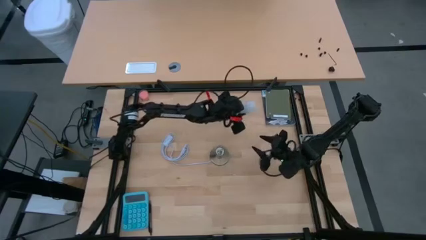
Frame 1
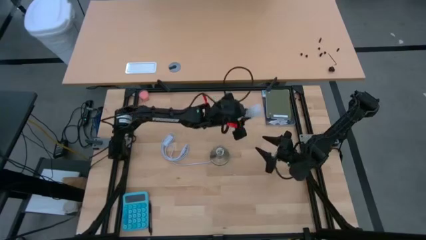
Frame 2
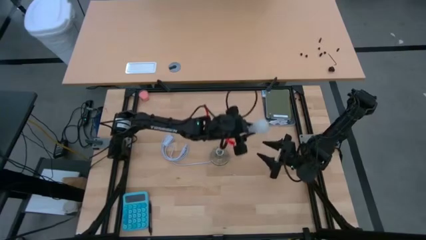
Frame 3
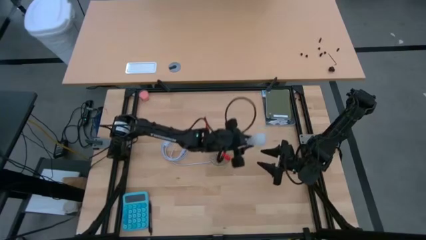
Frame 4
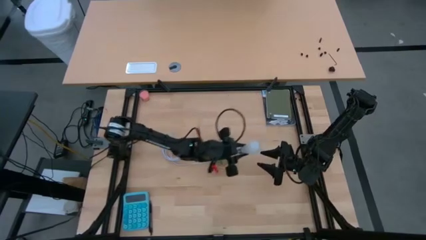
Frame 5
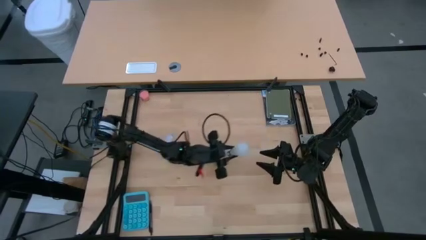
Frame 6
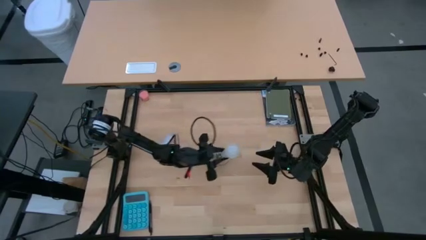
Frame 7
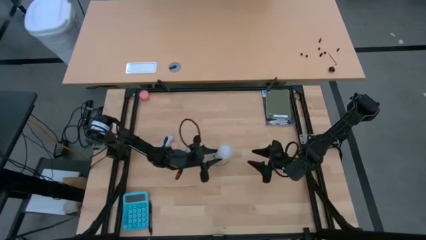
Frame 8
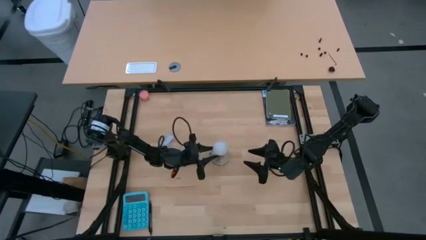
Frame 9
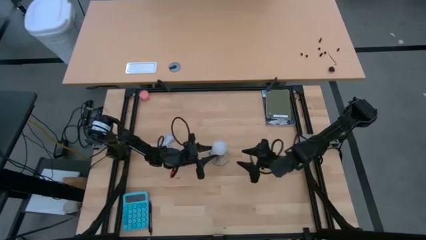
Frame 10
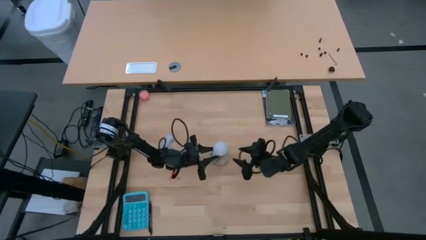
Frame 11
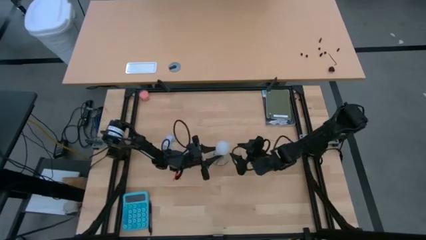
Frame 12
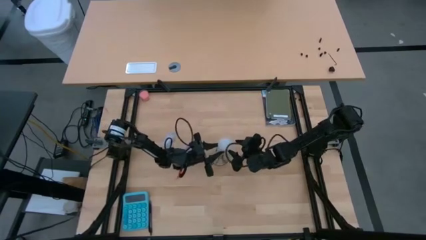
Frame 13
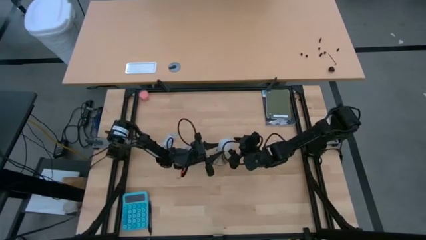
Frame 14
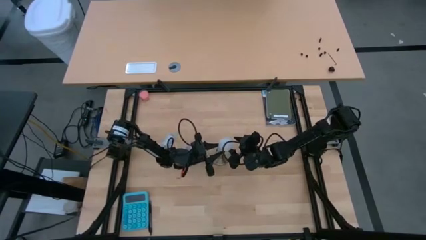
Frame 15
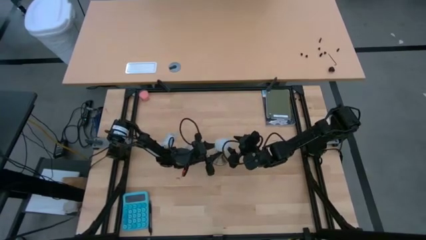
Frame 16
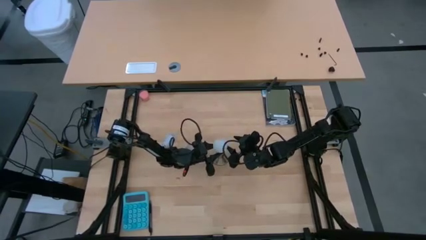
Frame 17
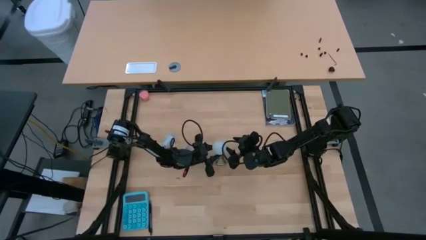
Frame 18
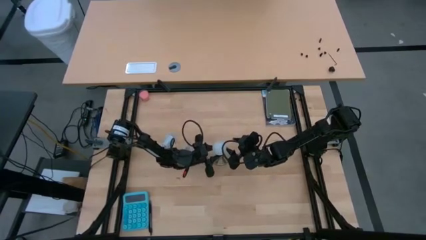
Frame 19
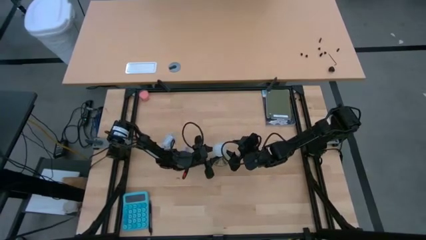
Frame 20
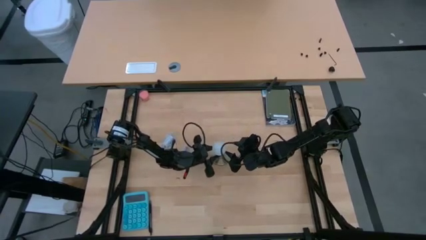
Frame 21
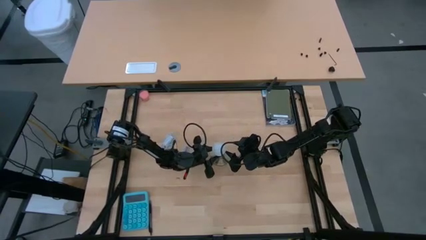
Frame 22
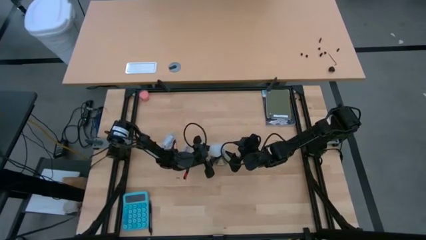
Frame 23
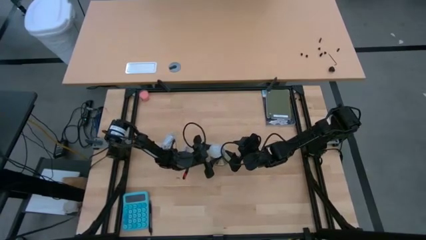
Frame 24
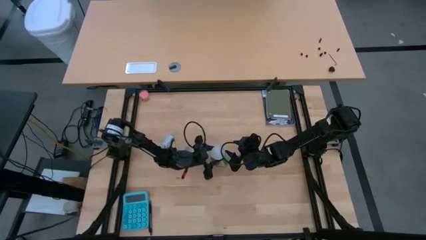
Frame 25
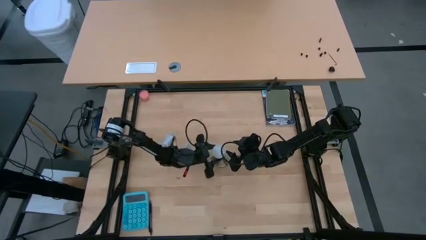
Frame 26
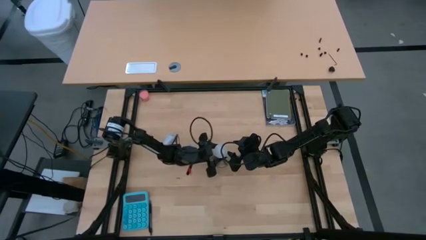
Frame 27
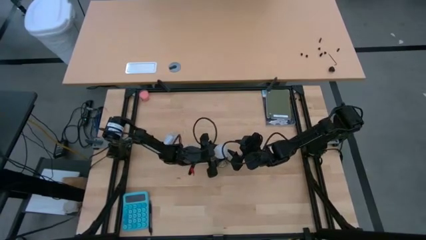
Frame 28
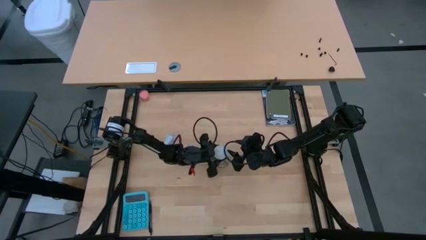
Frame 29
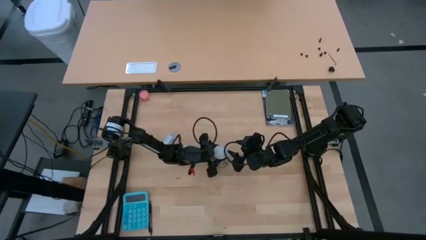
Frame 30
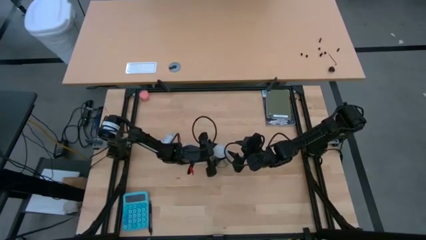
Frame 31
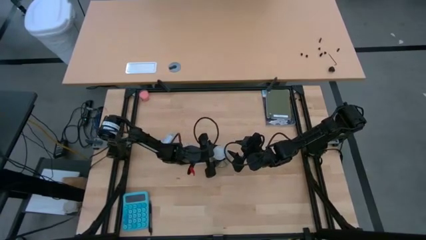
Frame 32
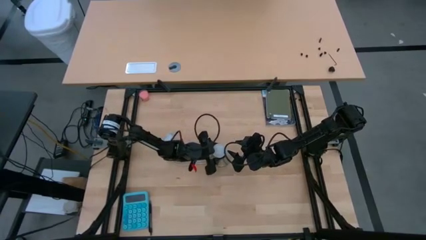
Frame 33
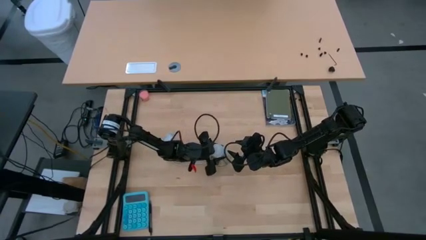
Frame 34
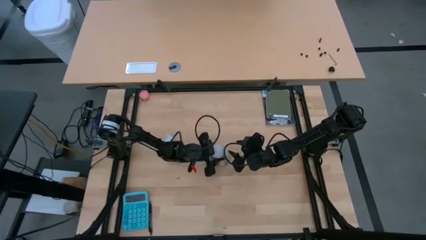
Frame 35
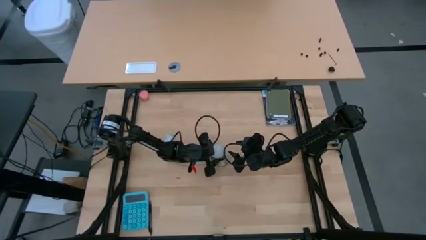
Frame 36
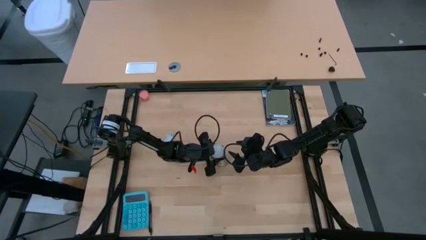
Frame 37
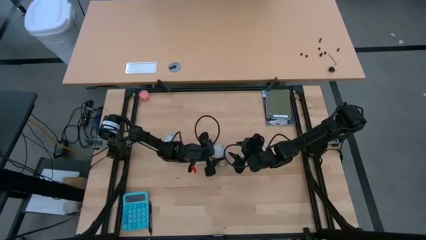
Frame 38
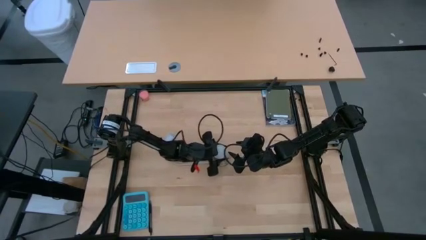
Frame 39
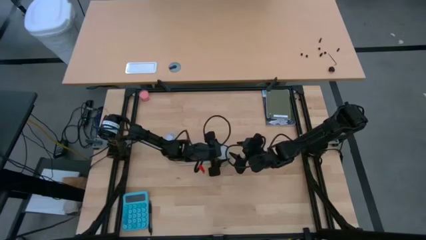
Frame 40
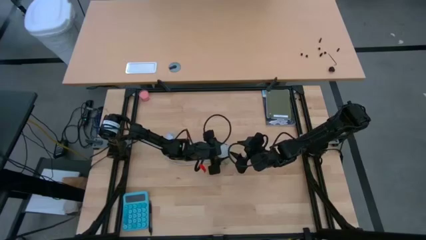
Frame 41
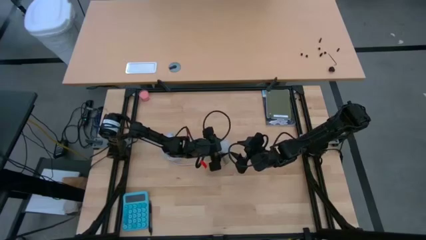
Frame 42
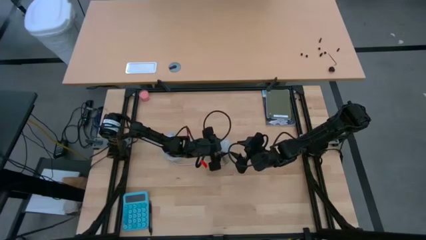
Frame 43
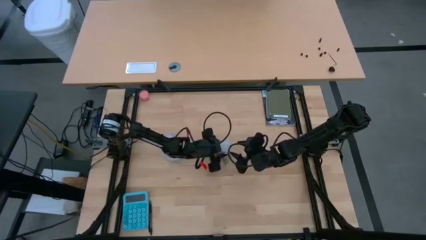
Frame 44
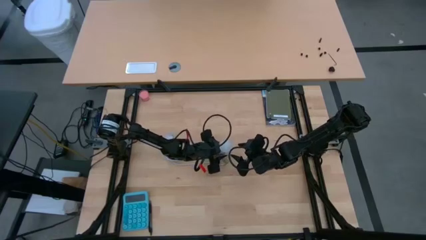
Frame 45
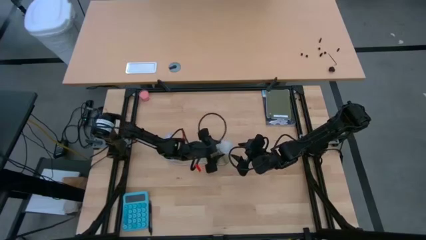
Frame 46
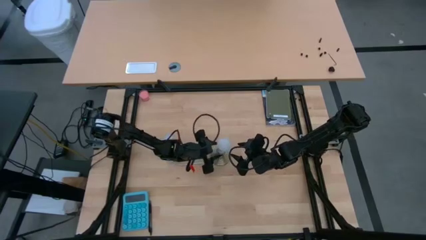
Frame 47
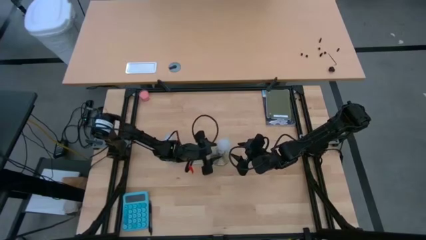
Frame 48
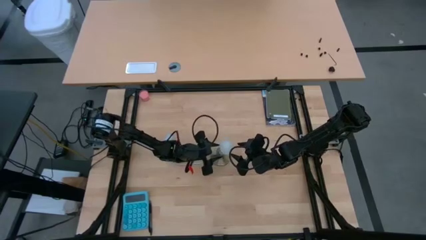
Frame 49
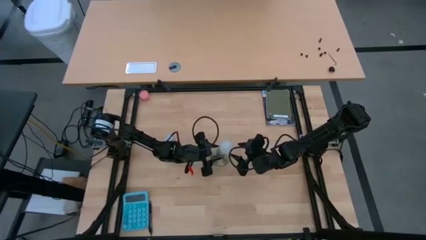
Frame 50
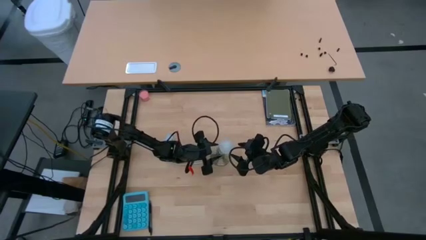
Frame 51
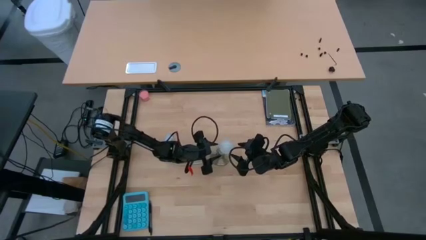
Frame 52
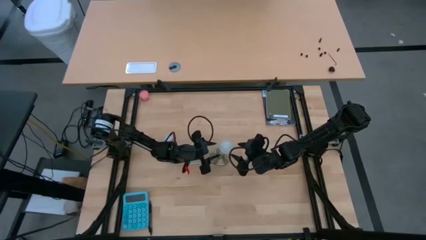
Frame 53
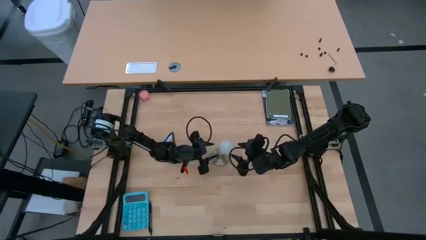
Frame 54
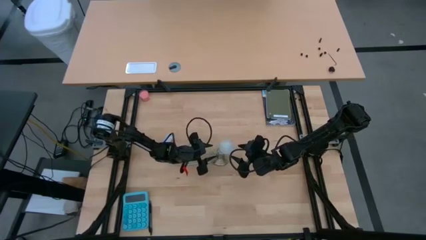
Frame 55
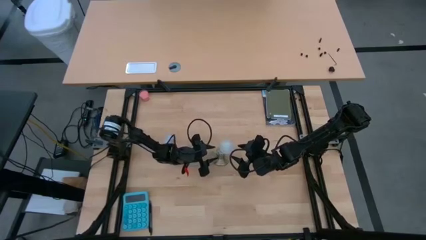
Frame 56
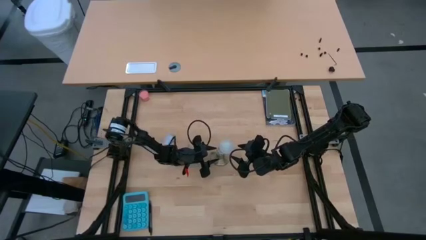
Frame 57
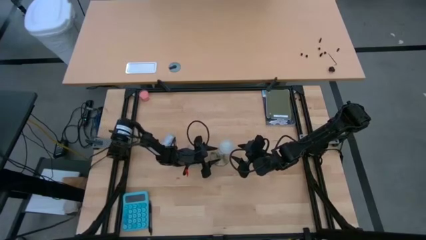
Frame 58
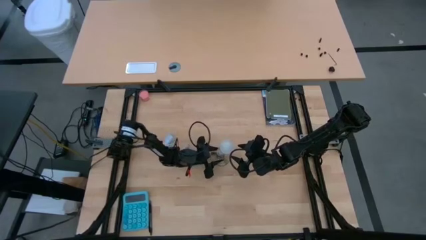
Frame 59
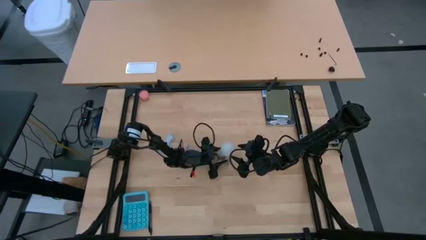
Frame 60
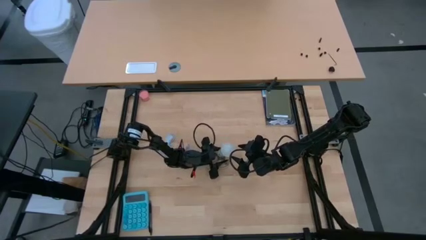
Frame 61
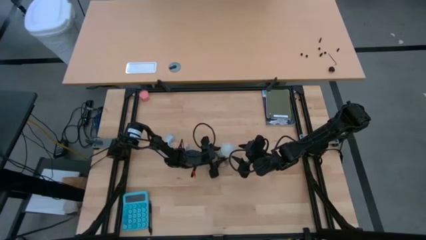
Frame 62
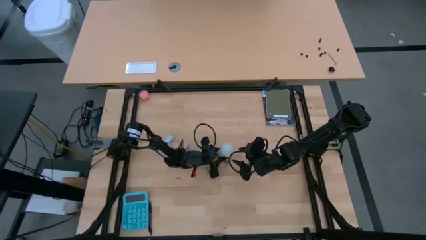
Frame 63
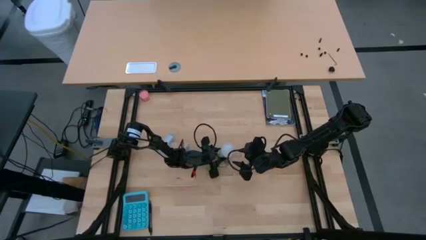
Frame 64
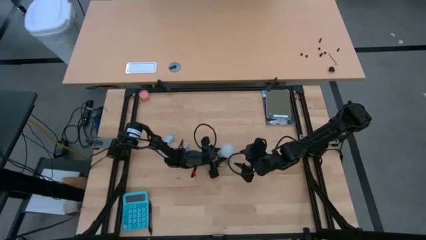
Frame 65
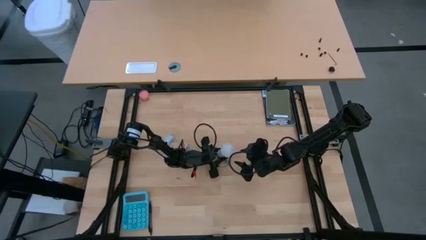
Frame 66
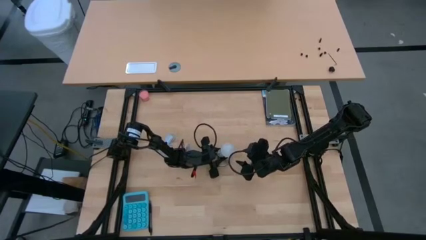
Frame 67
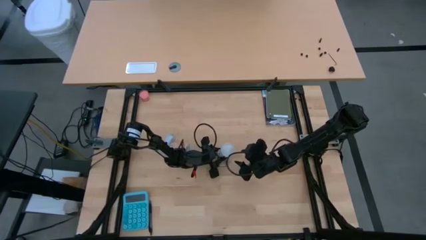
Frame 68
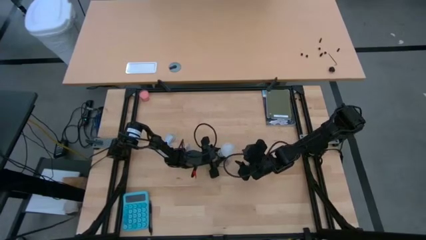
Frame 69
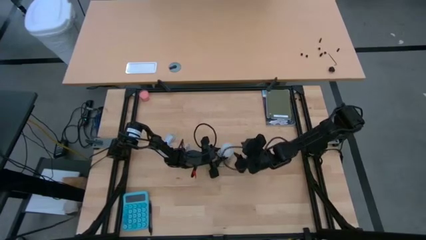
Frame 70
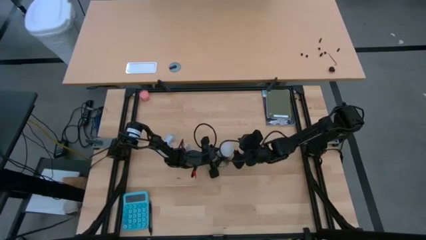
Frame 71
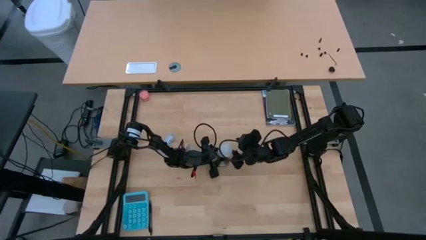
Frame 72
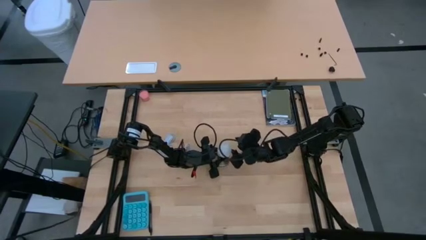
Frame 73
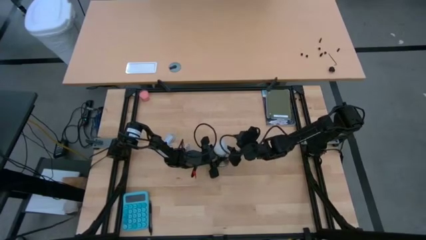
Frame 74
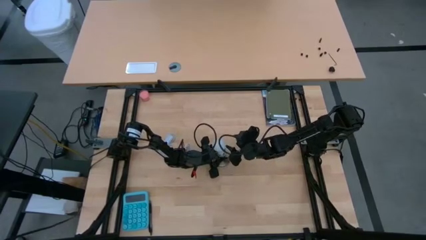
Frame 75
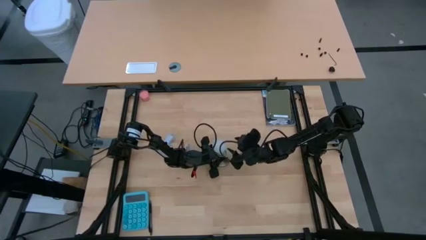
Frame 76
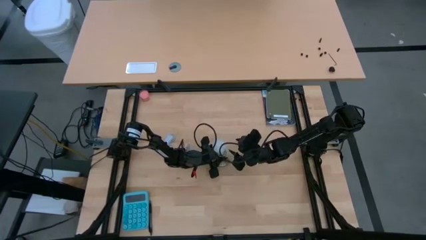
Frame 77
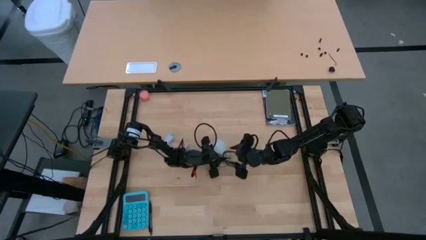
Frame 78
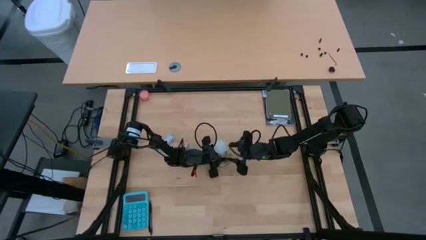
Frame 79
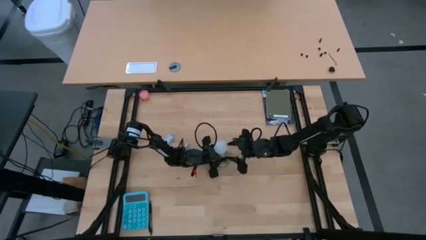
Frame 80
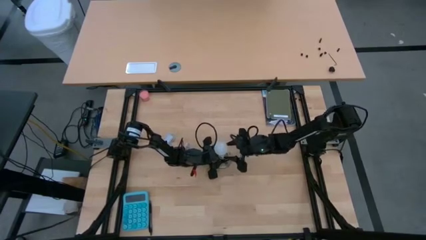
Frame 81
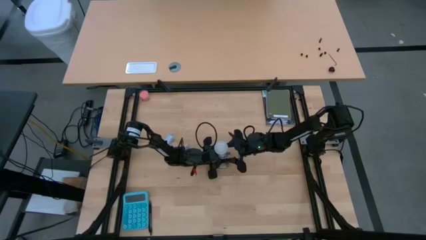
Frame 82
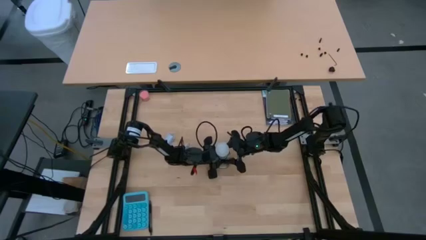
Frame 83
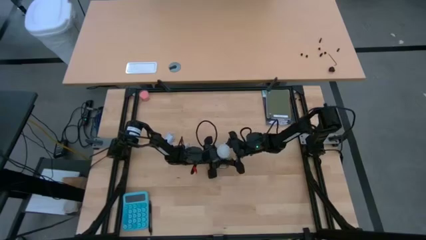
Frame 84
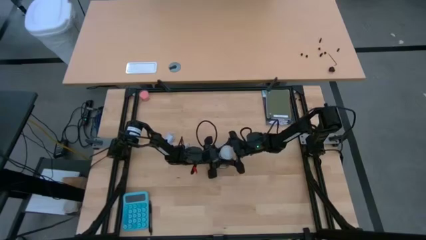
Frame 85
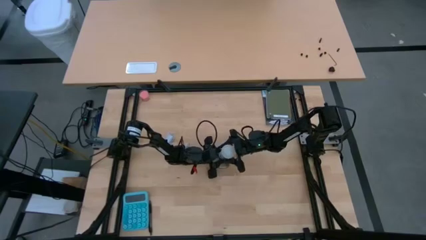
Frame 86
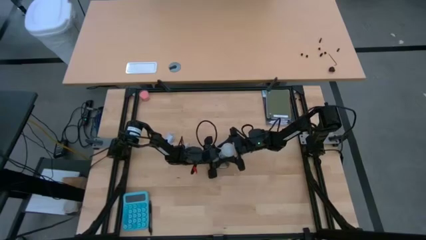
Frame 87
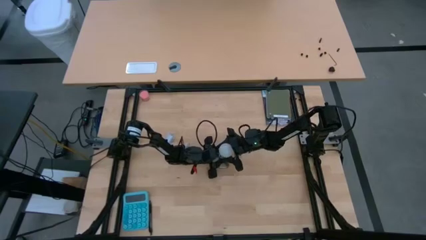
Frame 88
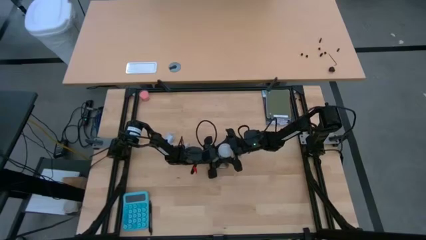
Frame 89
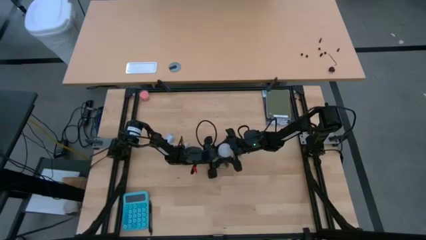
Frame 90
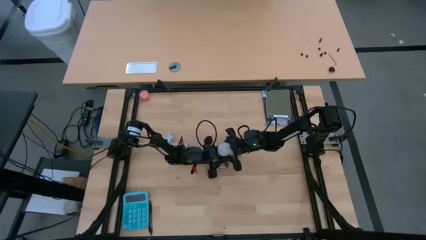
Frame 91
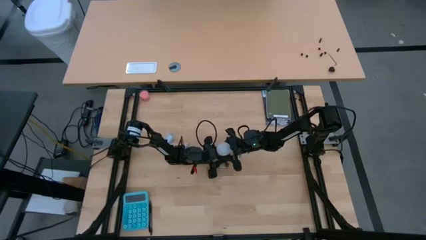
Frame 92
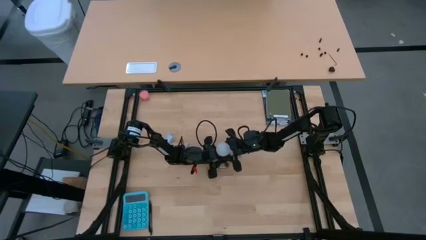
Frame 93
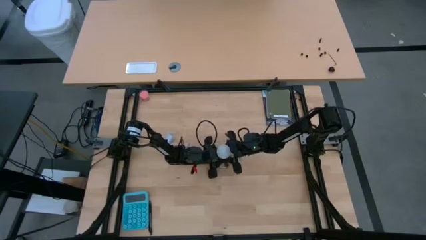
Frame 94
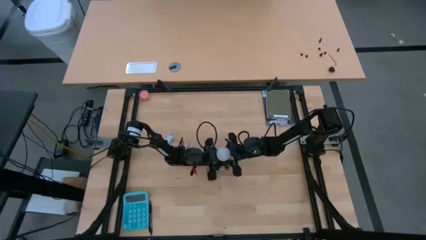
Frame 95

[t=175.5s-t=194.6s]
Task: Screw lightbulb
Insert the lightbulb into the lamp holder
